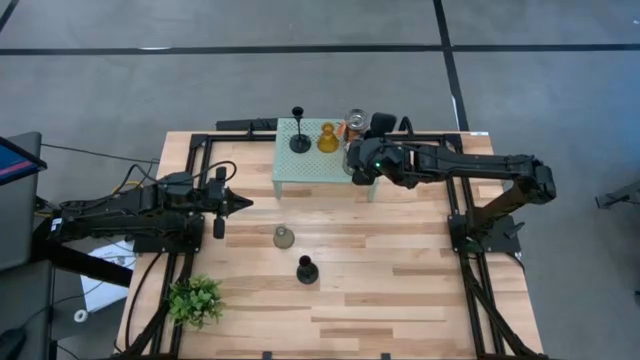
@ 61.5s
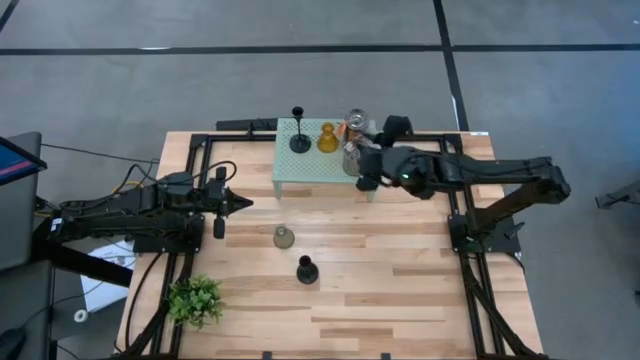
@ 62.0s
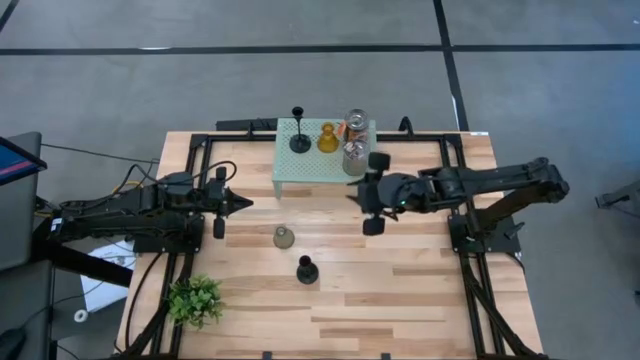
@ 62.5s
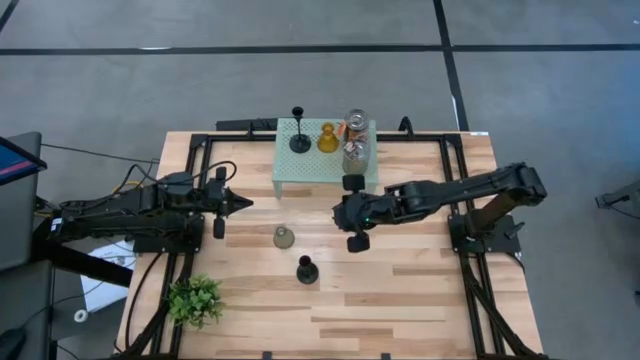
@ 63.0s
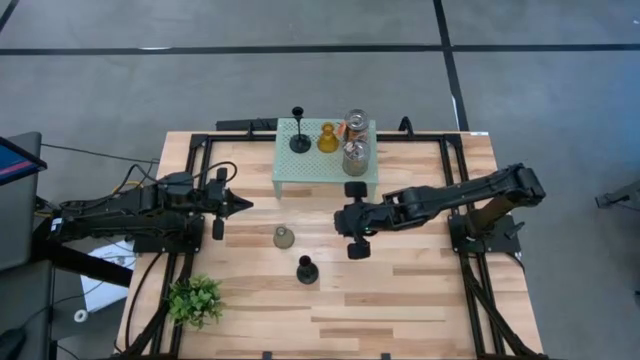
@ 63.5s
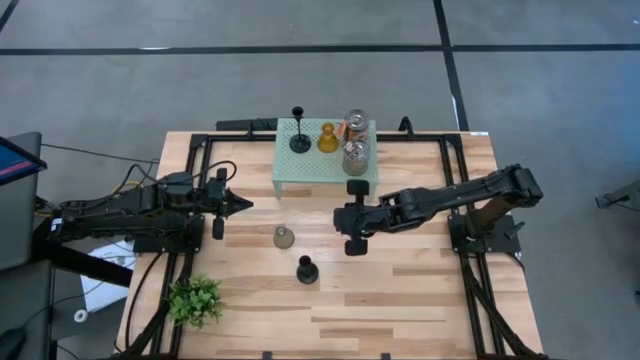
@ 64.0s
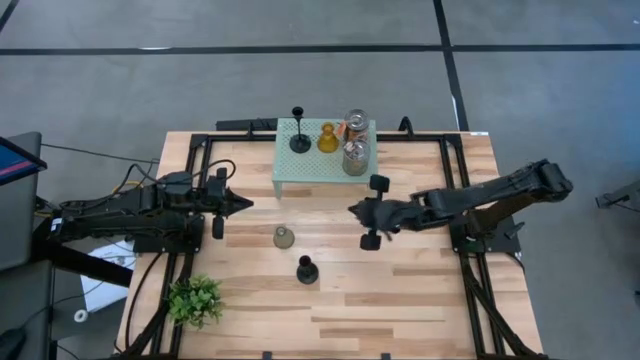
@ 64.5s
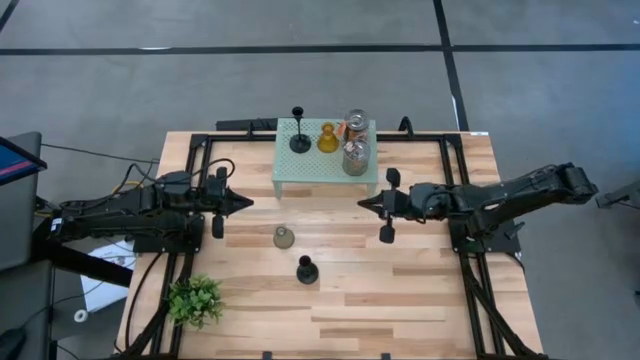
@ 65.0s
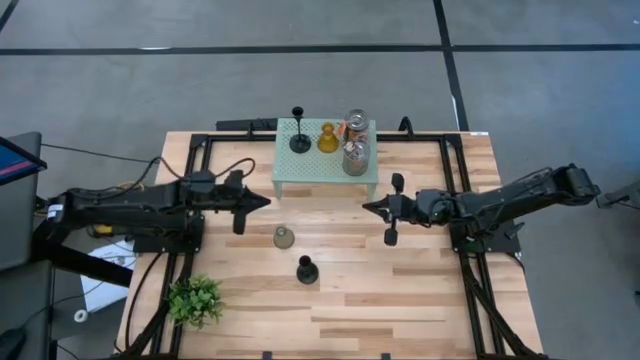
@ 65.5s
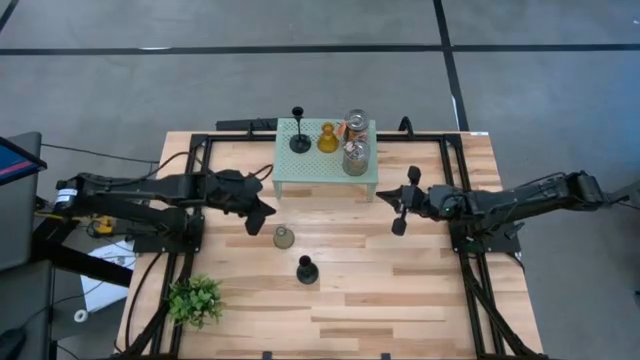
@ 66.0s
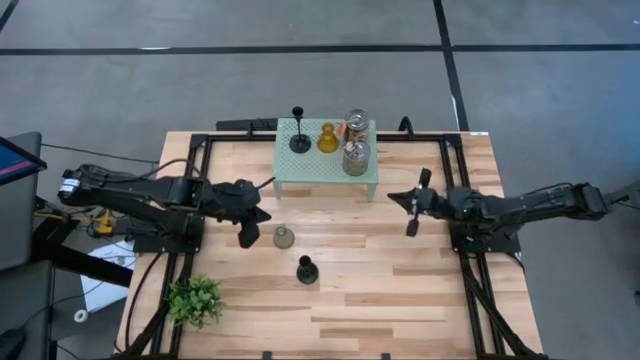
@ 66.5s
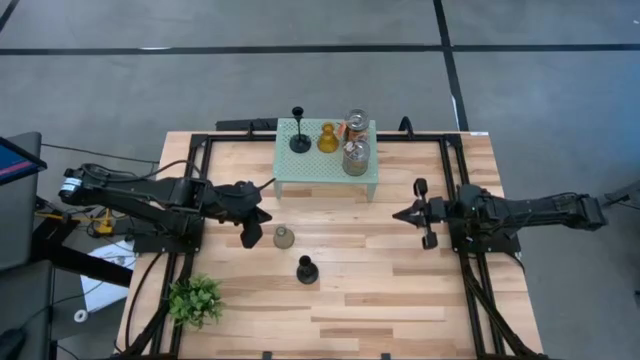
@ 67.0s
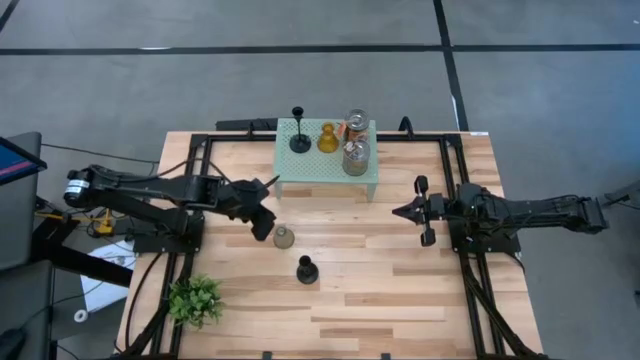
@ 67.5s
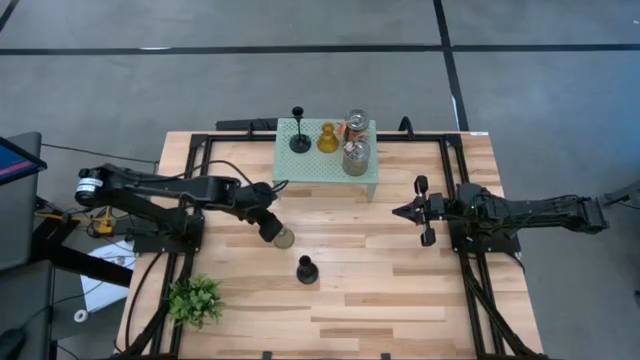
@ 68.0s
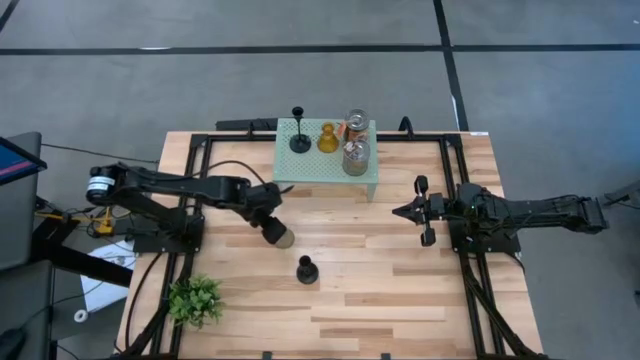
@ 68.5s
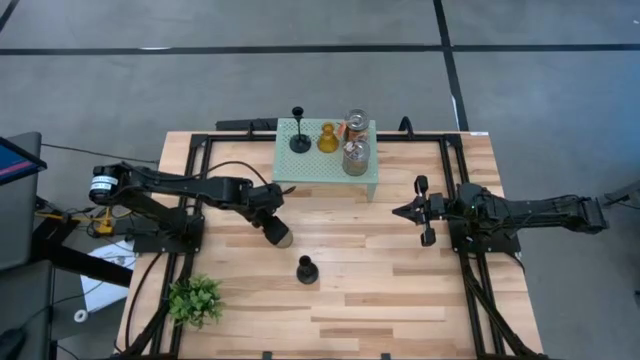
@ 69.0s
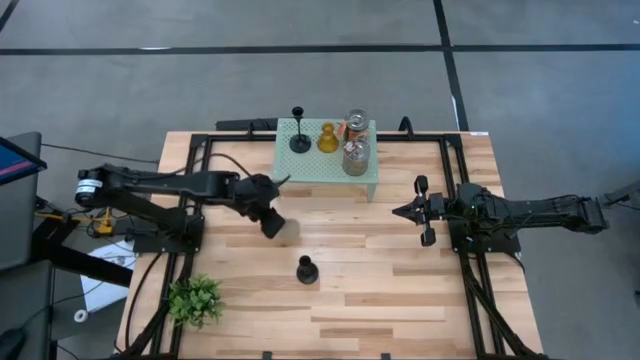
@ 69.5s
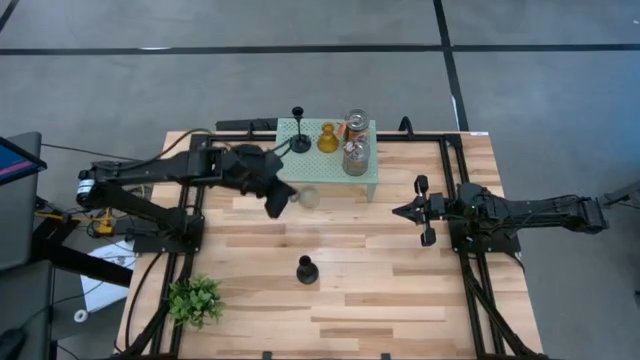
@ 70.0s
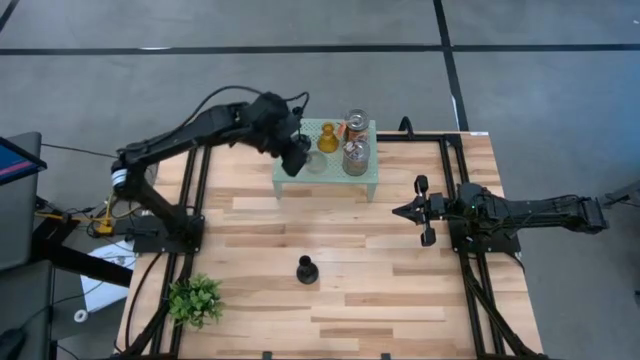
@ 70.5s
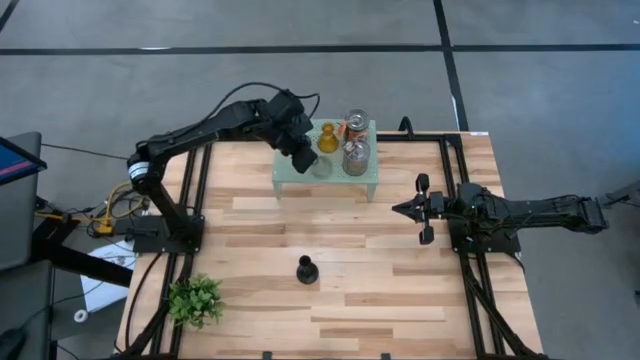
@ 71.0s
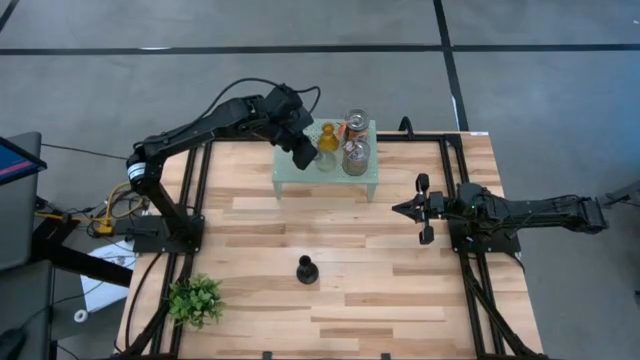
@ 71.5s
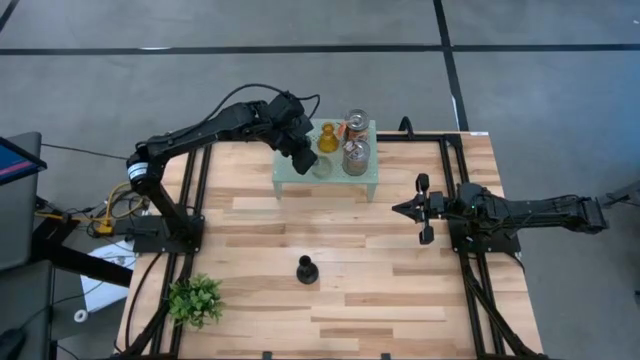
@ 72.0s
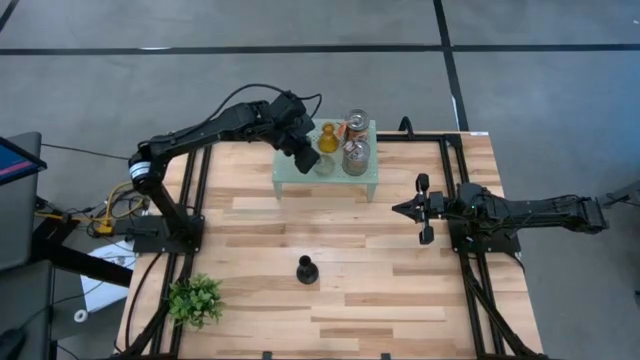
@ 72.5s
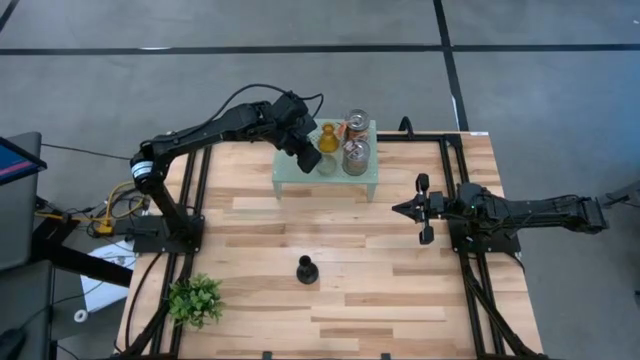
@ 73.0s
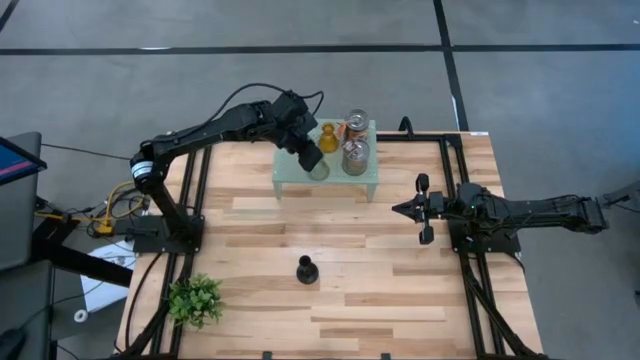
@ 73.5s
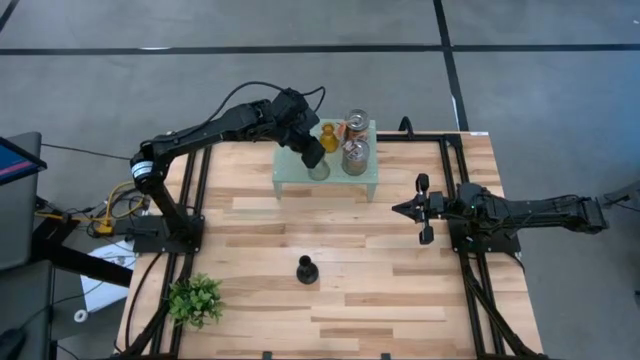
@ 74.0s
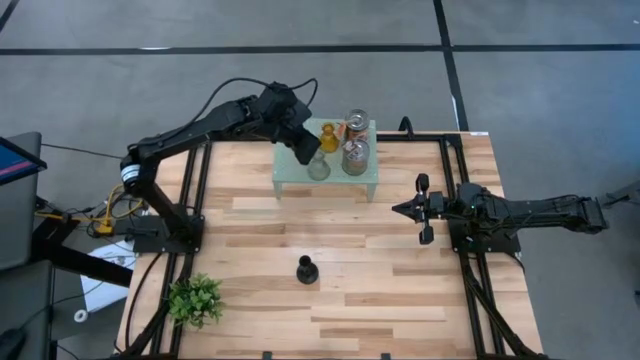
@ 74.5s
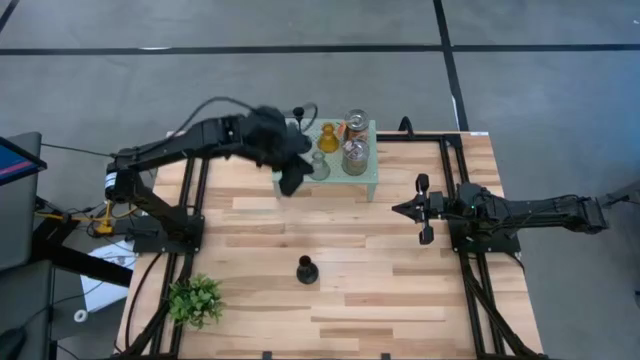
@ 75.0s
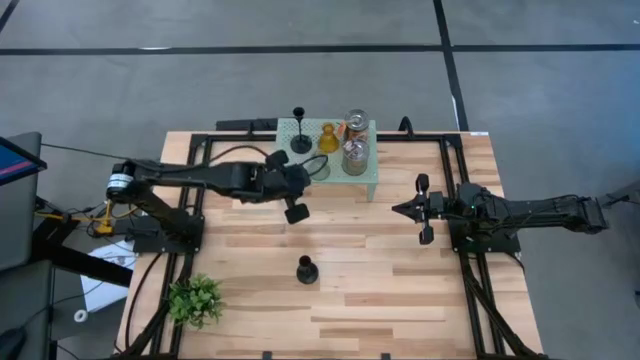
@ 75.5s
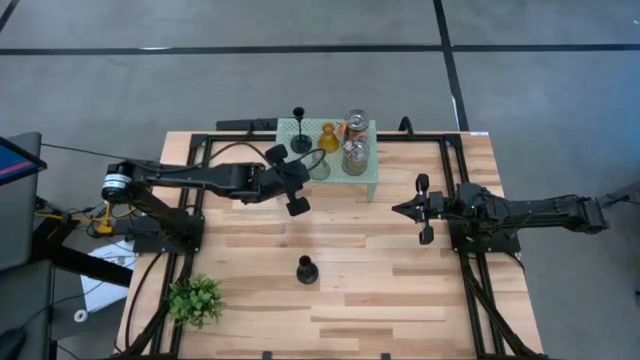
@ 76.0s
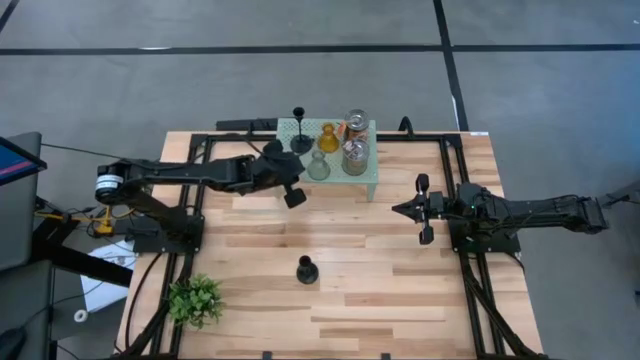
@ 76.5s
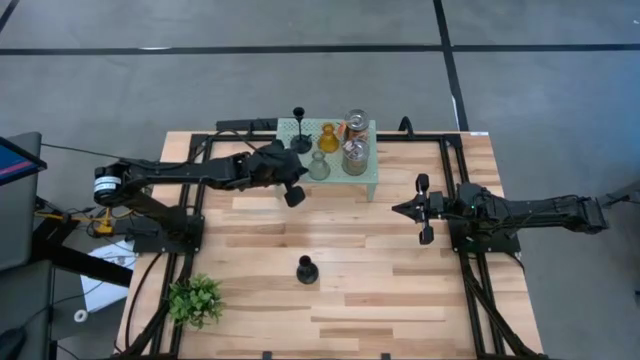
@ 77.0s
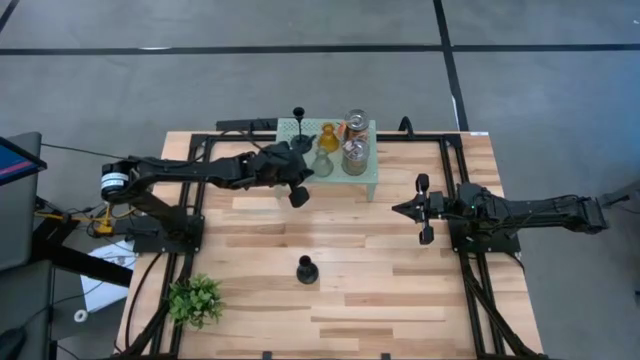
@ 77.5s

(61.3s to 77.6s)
Task: Pick & Place candle stick holders
Put the green glass holder on the shelf aligned with the other glass holder

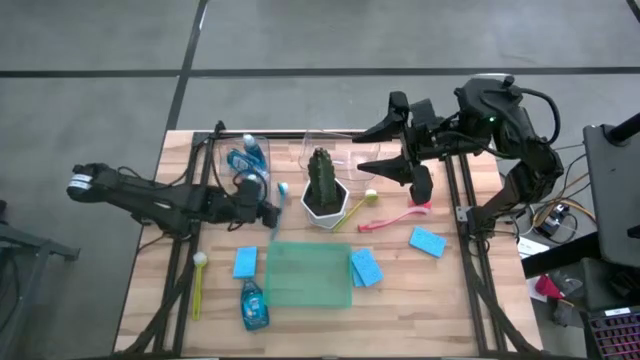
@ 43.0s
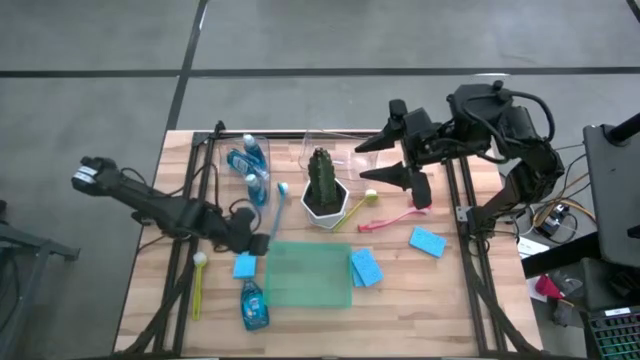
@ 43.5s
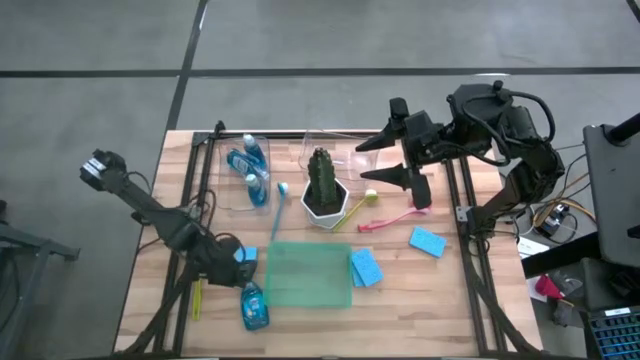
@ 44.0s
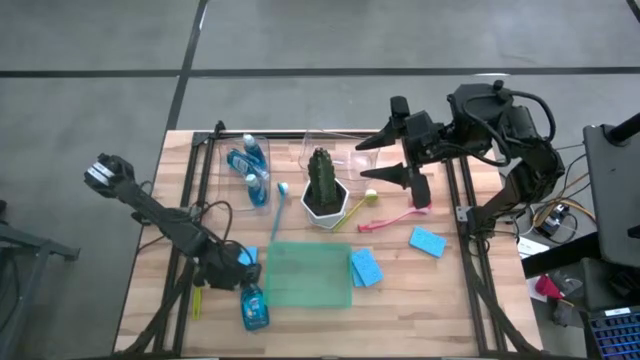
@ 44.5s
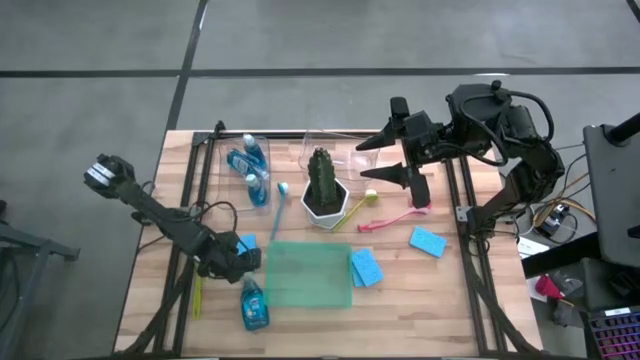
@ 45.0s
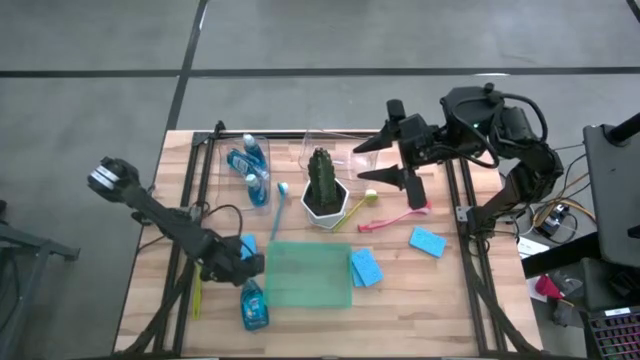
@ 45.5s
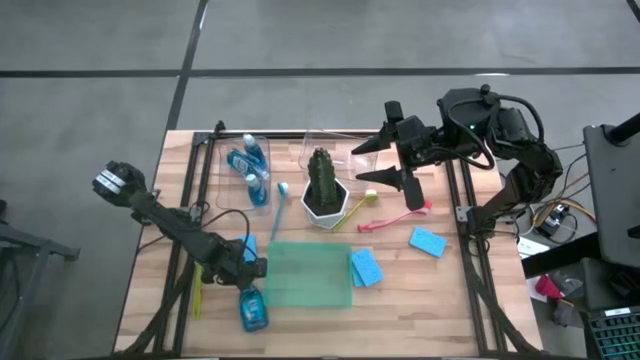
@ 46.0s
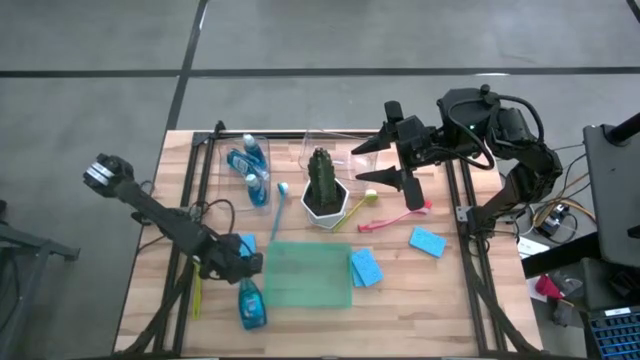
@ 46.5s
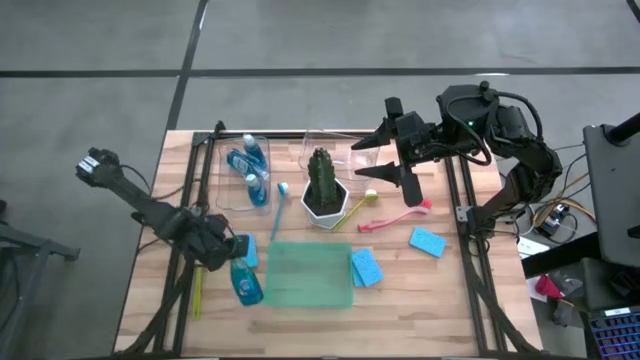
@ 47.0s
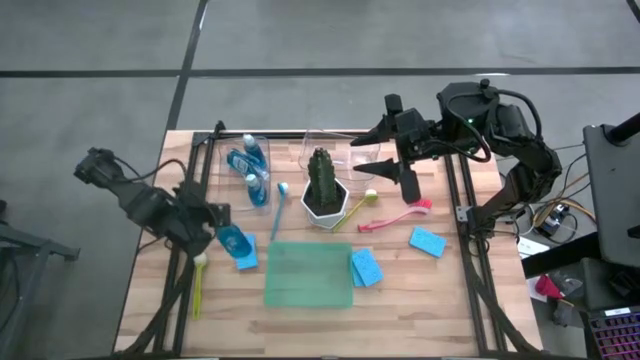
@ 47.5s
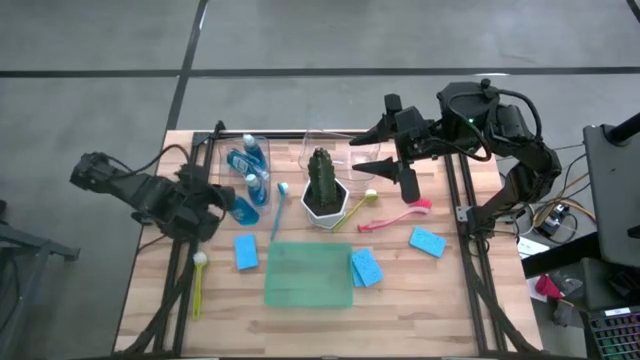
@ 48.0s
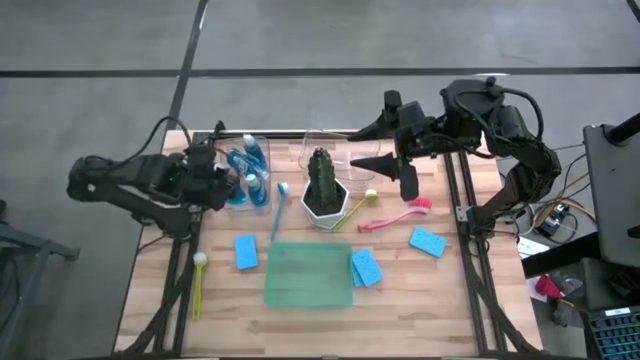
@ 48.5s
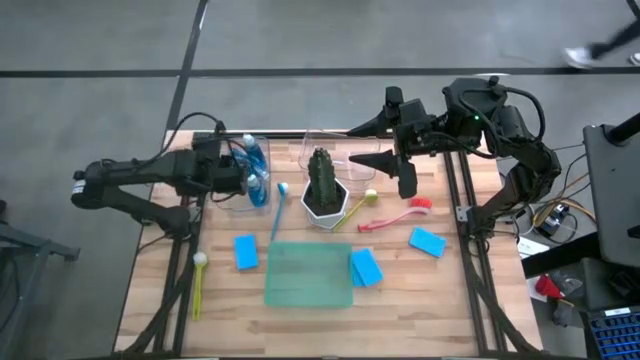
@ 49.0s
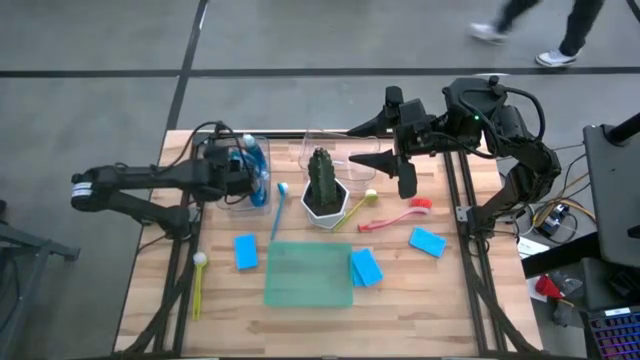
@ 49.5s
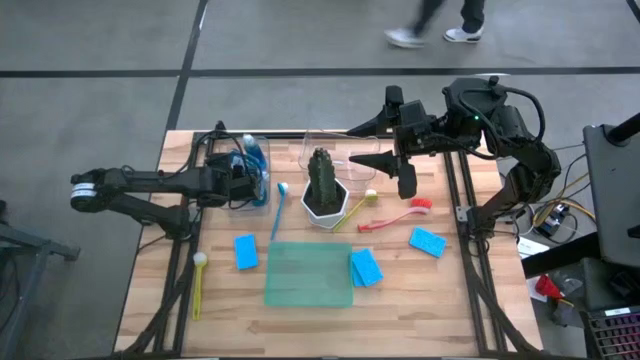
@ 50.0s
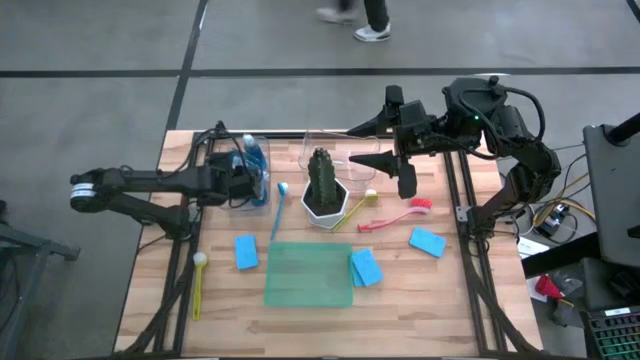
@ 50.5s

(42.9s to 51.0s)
Task: Pick & Place Kitchen Sink Supplies
Put the blue dishwashing liquid into the left transparent bin
